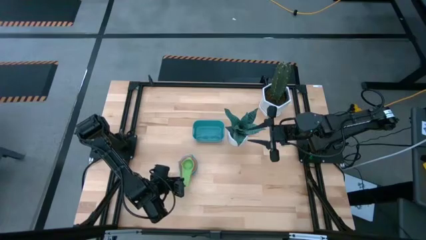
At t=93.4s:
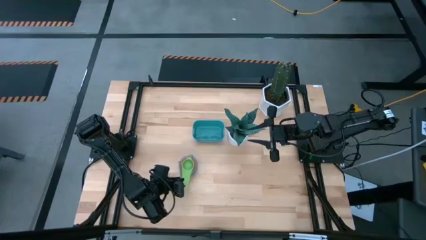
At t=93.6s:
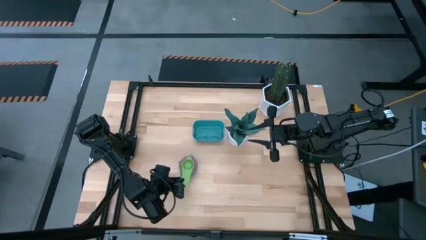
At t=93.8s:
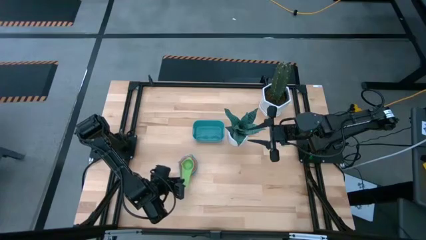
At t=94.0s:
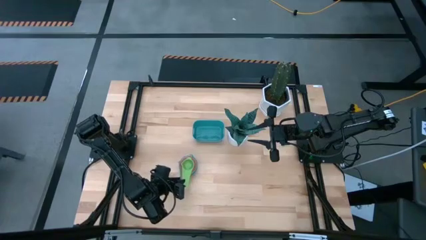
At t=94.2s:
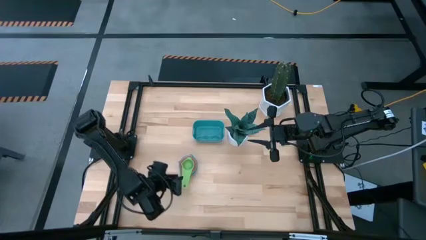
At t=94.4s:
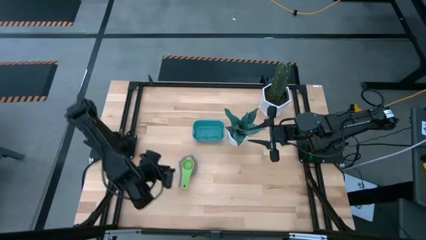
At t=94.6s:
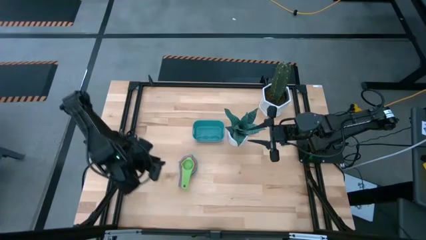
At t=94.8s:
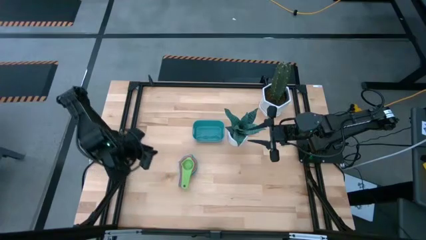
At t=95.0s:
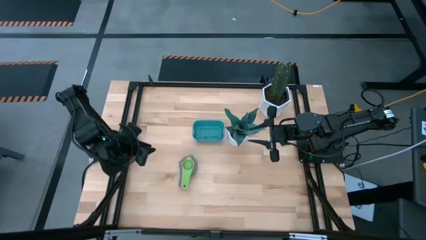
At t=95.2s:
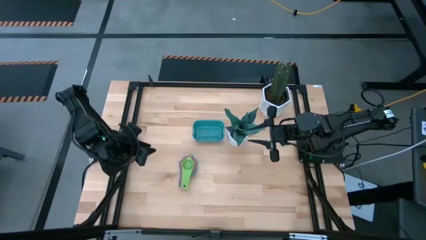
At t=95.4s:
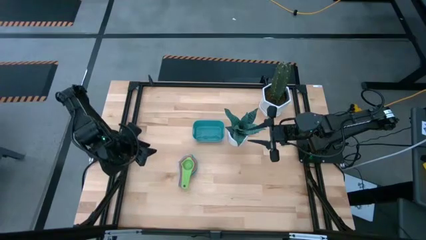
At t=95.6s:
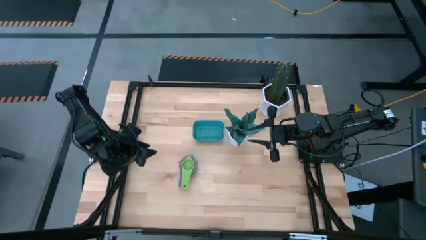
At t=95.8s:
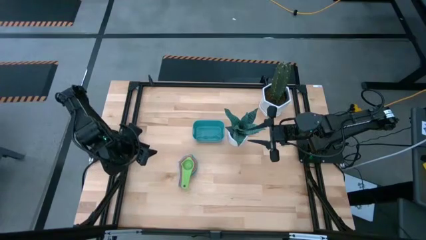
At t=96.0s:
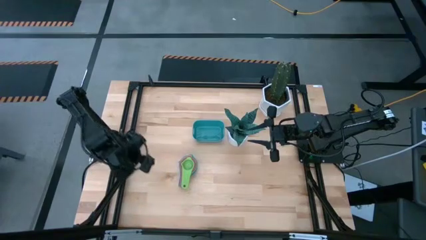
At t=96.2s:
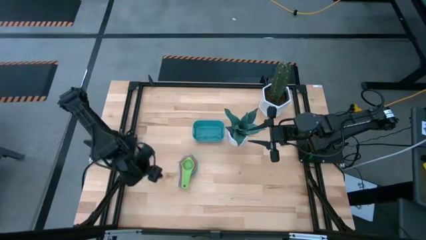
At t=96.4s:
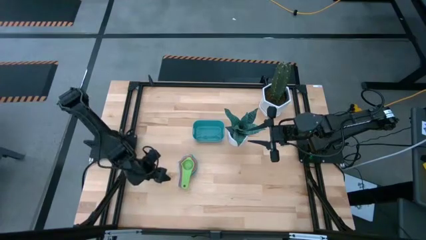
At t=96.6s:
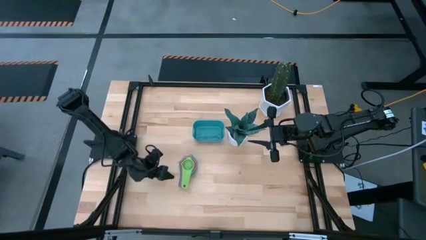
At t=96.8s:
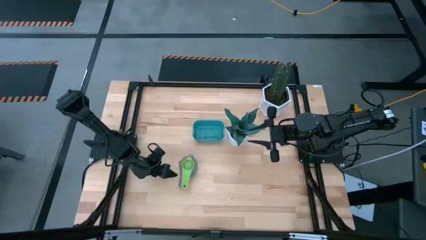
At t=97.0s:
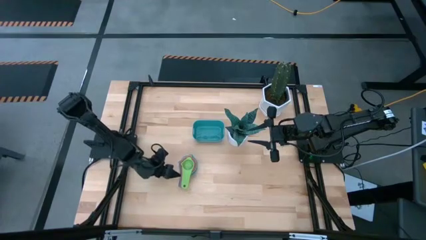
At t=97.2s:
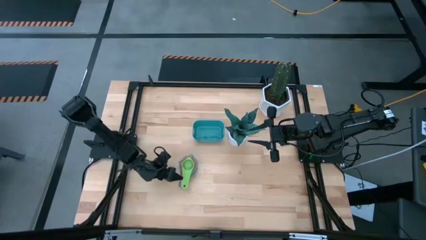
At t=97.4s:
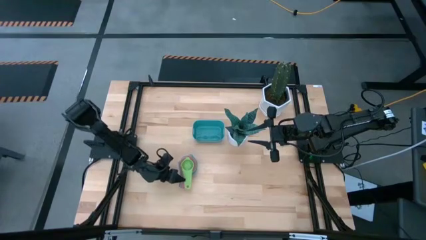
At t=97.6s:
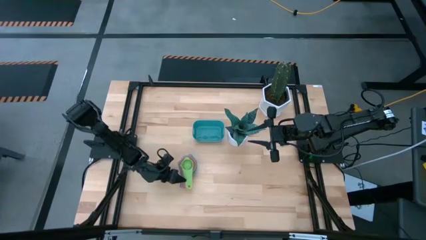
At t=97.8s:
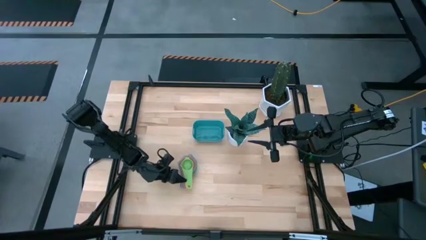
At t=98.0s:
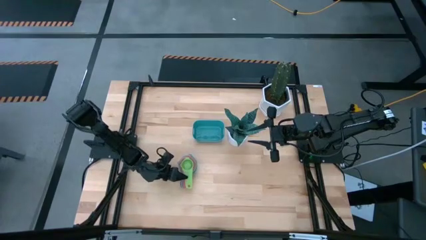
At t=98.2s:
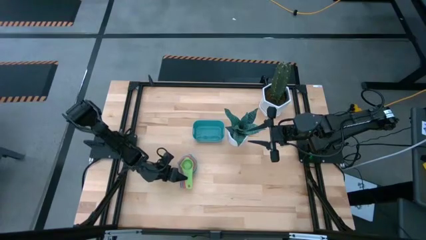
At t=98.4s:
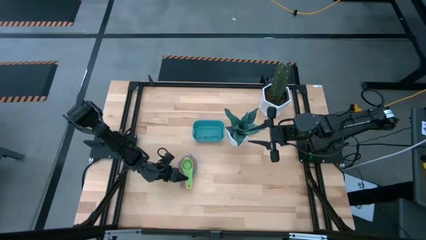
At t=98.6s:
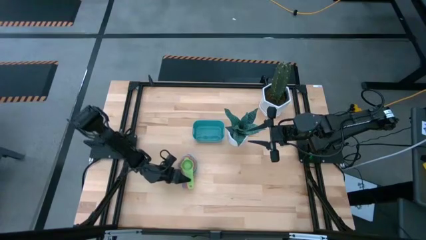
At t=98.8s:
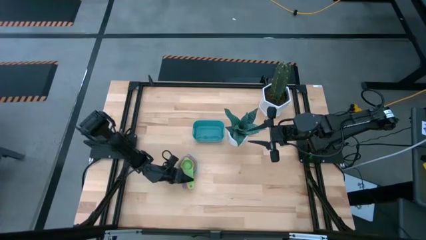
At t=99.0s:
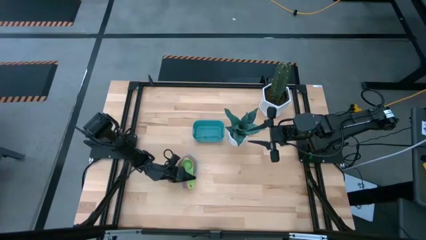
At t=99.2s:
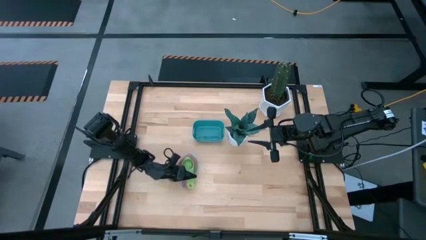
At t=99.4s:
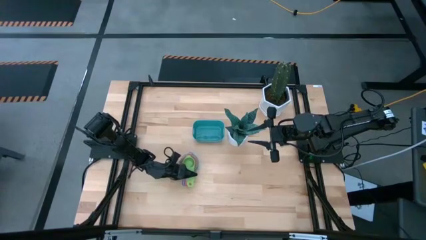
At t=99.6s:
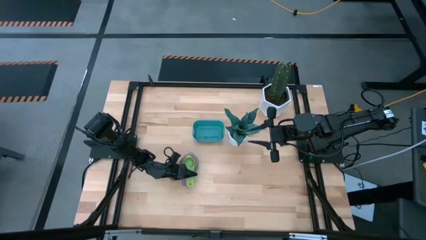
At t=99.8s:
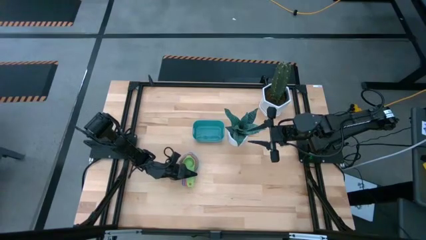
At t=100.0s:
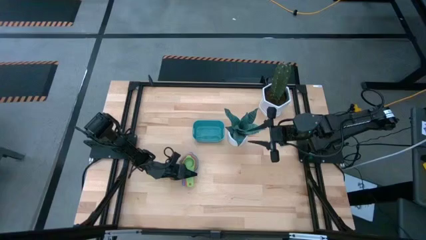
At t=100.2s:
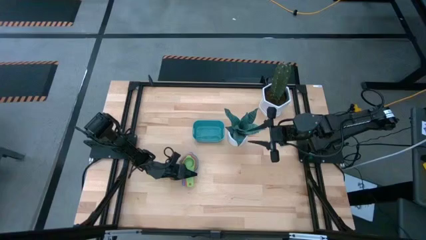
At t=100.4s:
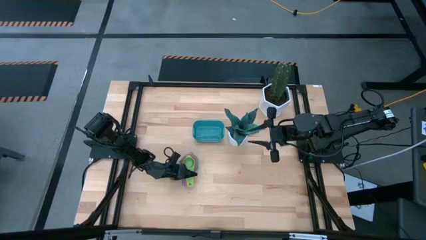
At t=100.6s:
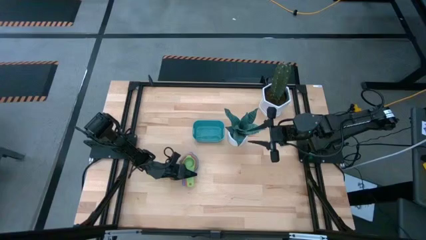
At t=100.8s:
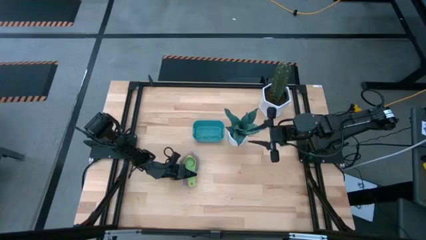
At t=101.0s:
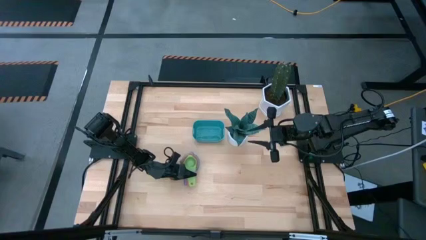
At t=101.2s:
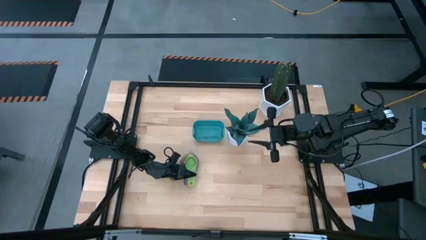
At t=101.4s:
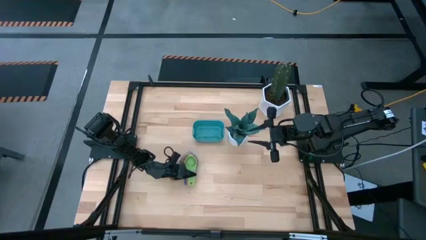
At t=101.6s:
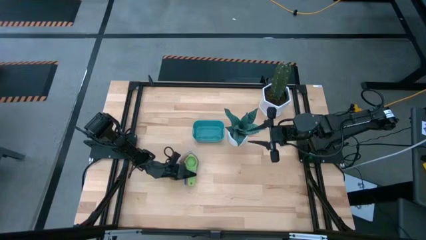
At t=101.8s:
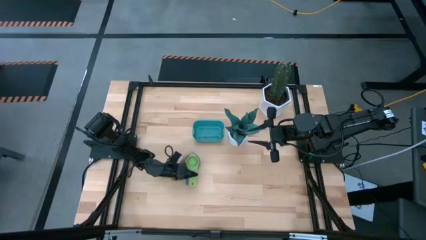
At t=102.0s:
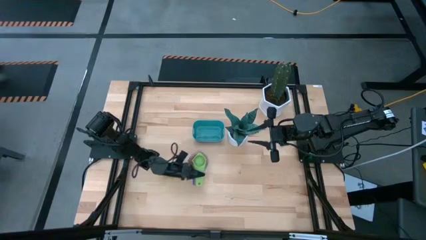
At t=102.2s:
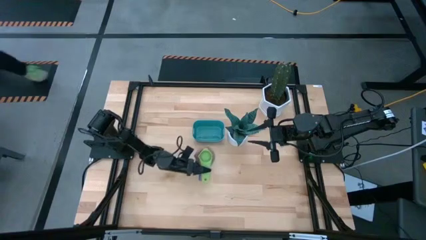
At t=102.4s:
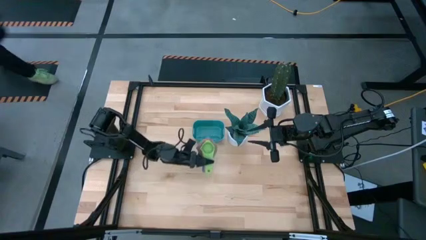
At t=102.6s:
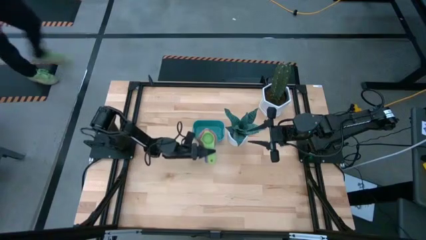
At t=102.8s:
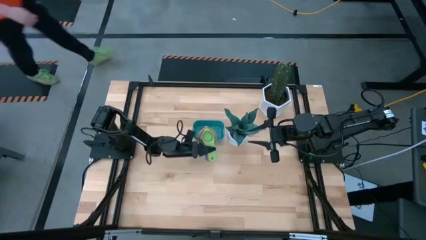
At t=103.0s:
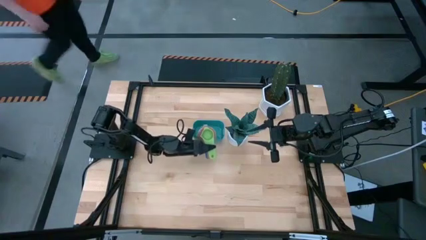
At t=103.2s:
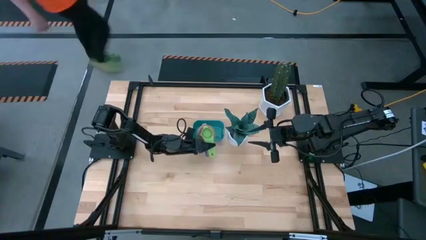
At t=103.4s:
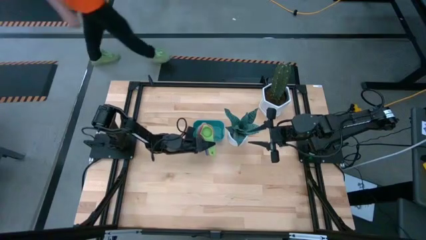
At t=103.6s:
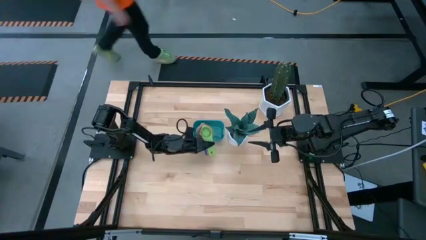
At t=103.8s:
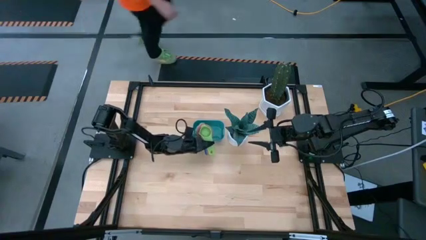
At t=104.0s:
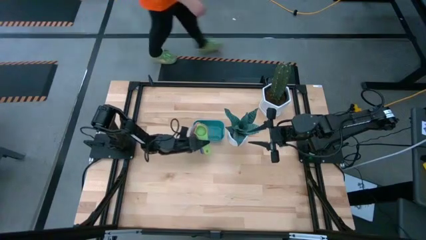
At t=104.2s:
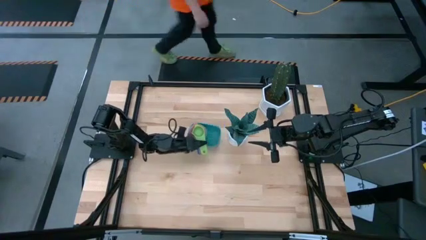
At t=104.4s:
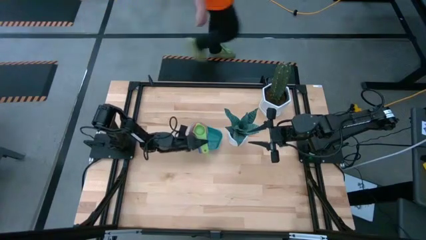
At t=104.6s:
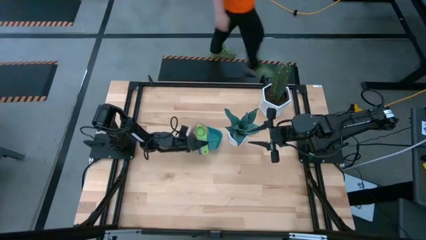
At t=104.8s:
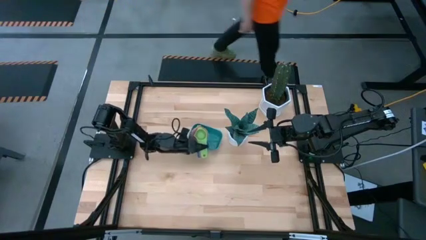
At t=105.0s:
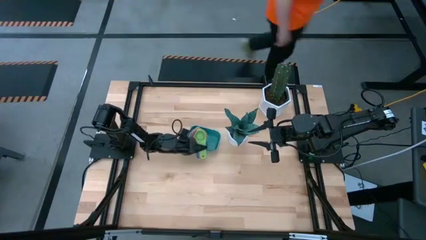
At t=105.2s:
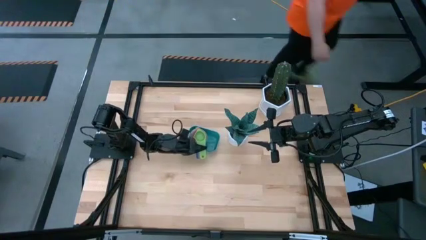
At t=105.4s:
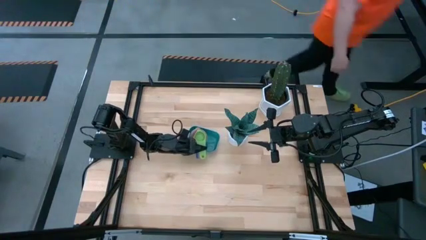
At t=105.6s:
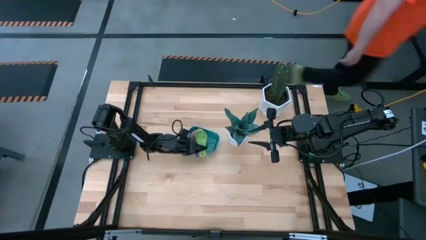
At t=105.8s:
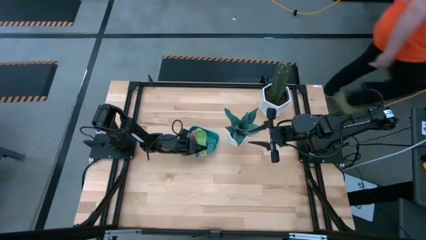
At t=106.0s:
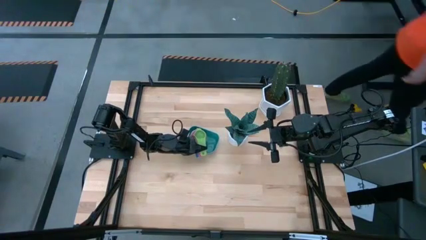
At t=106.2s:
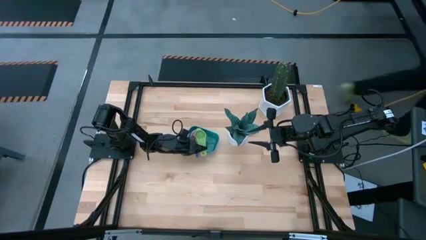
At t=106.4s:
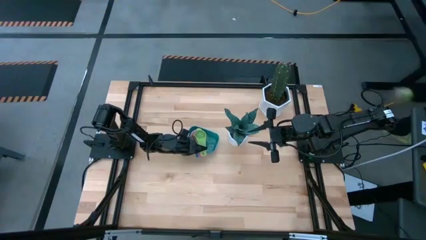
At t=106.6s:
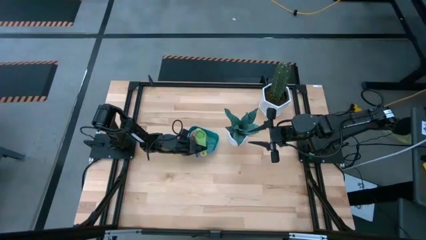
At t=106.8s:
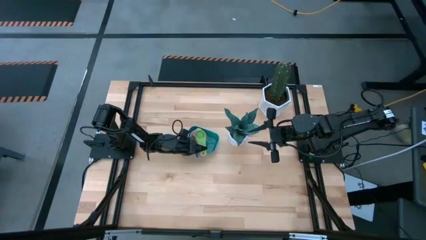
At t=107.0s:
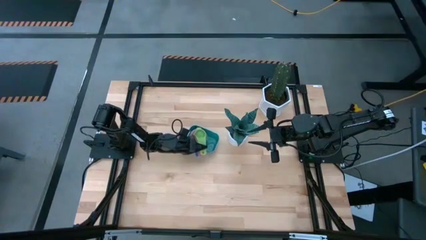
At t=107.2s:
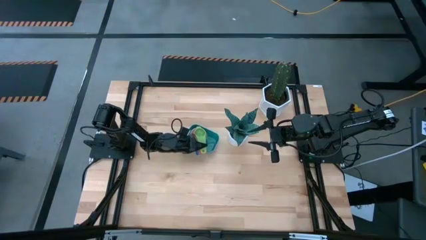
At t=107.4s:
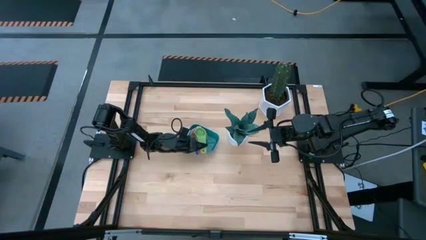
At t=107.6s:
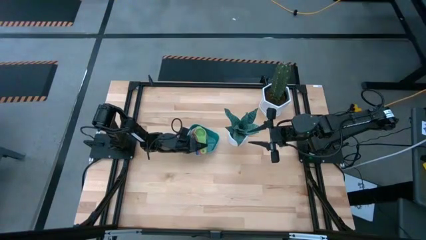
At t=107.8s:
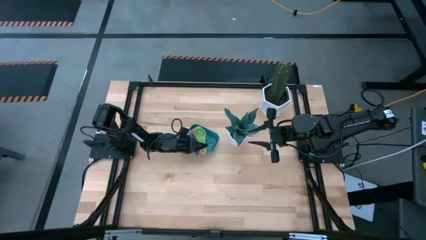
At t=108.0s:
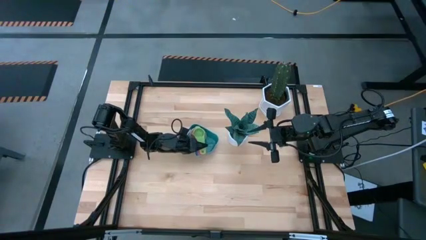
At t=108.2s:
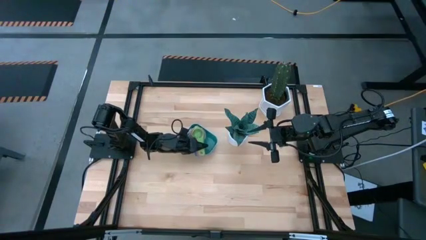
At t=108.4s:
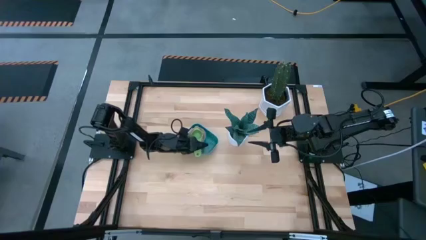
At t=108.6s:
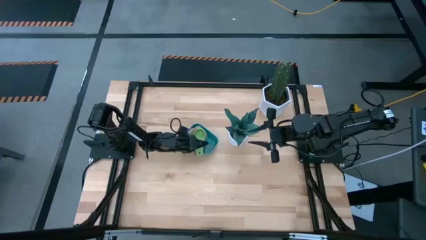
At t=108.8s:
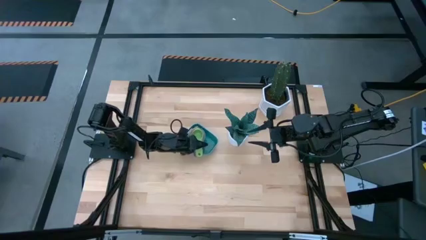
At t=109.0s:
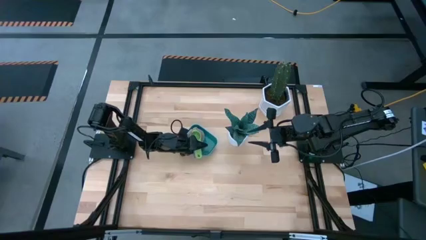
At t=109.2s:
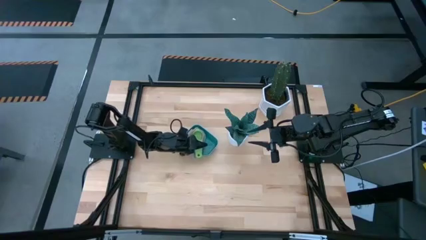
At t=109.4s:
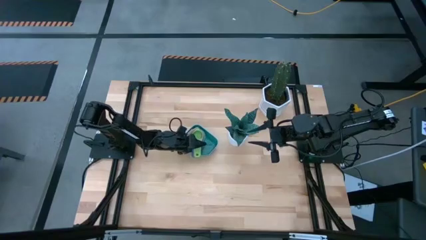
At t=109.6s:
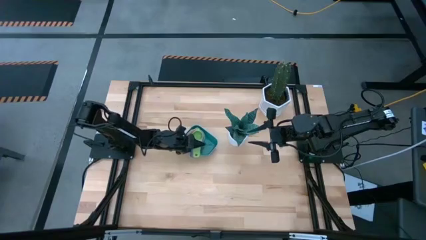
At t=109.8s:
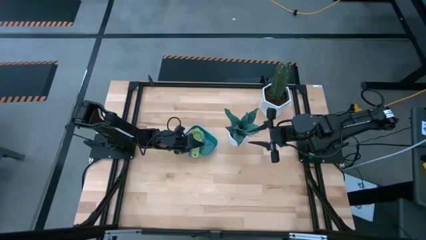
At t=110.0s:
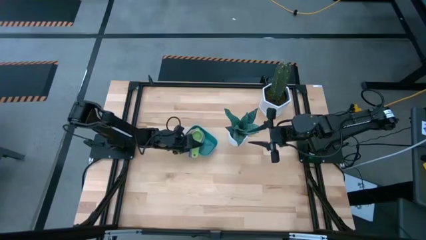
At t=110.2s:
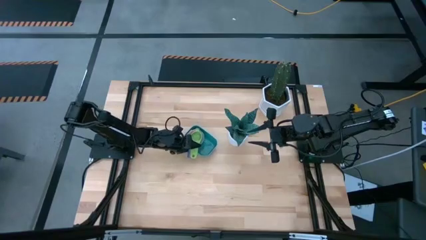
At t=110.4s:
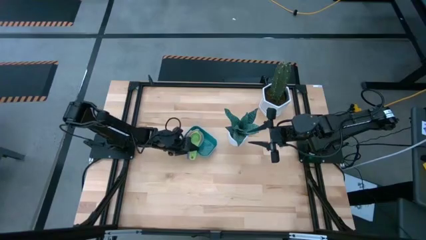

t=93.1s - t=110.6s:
Task: Nest measuring cups in basket
Put the stacked measuring cups into the blue bin
